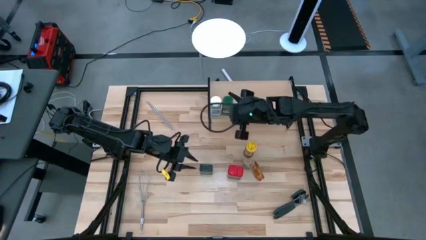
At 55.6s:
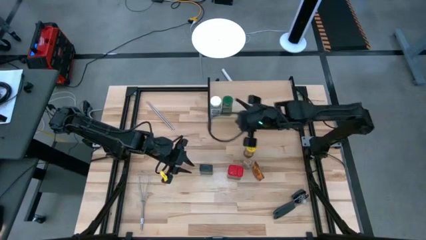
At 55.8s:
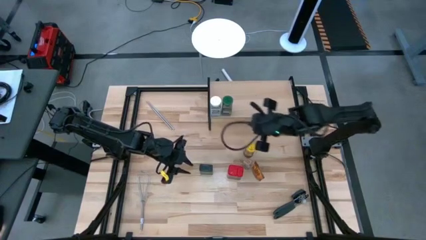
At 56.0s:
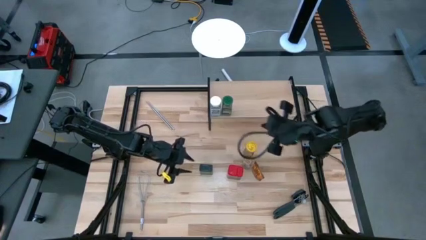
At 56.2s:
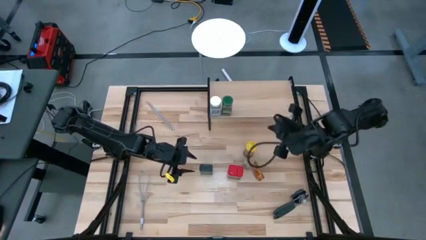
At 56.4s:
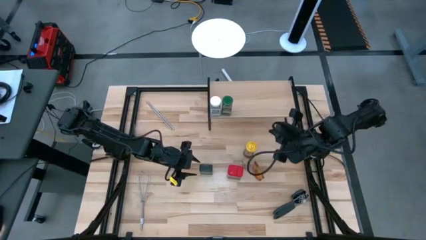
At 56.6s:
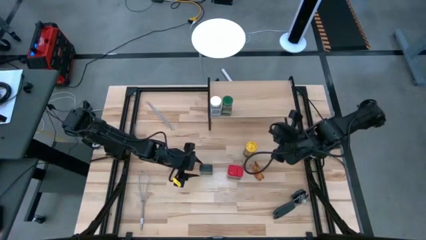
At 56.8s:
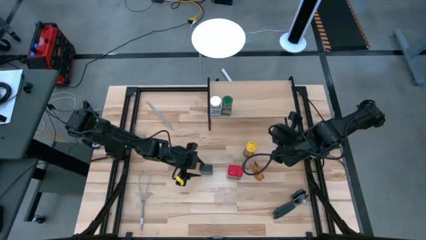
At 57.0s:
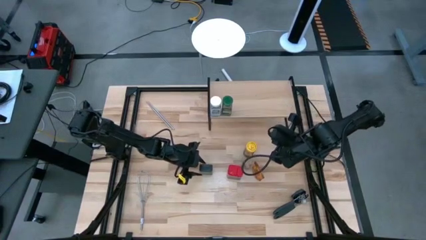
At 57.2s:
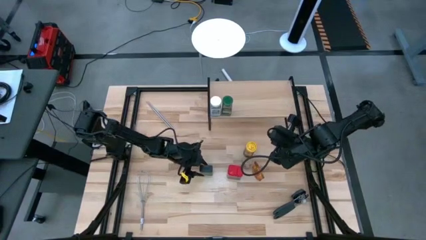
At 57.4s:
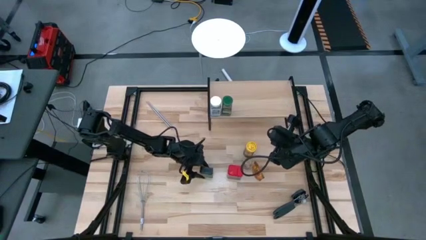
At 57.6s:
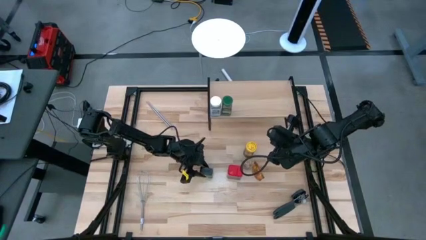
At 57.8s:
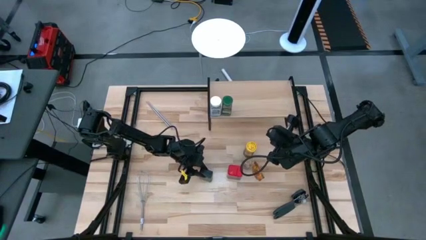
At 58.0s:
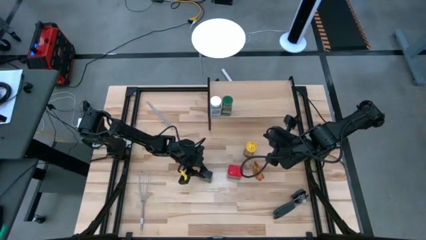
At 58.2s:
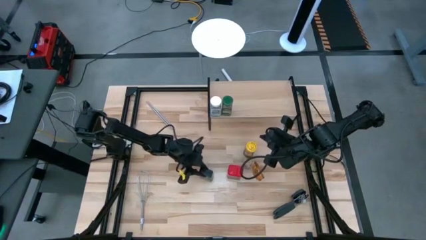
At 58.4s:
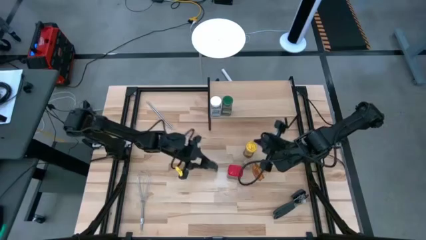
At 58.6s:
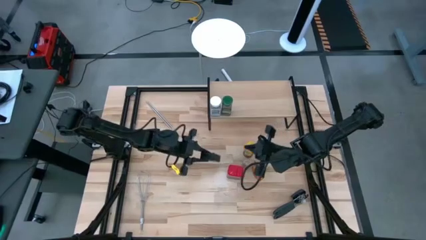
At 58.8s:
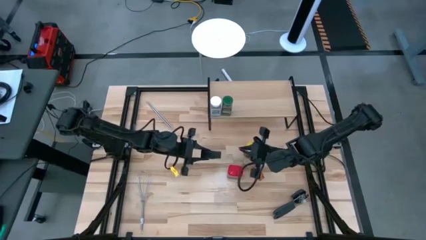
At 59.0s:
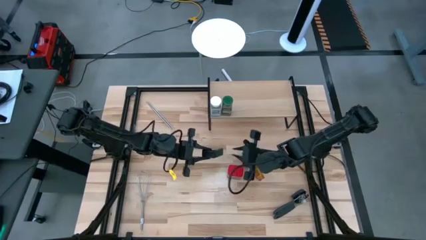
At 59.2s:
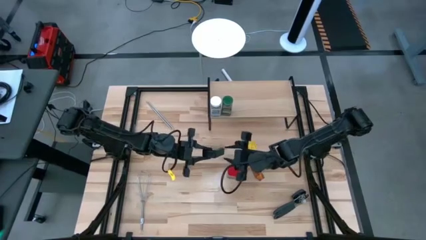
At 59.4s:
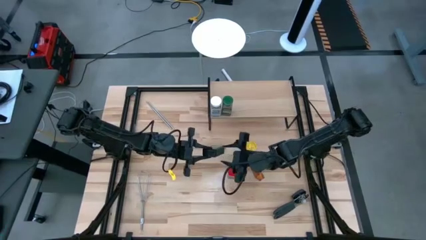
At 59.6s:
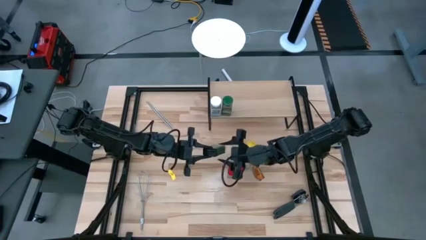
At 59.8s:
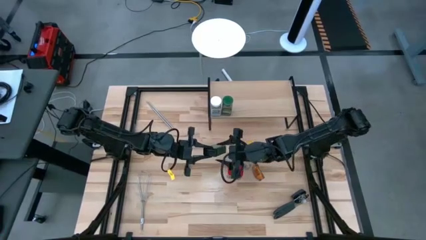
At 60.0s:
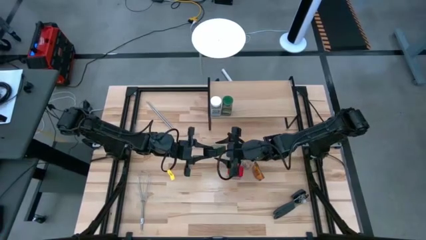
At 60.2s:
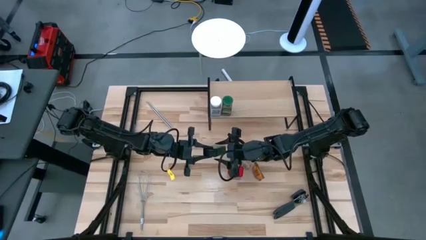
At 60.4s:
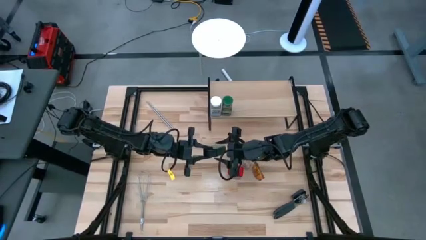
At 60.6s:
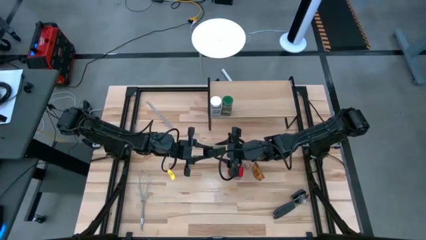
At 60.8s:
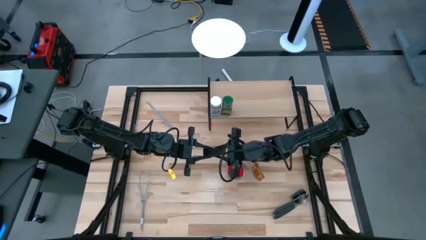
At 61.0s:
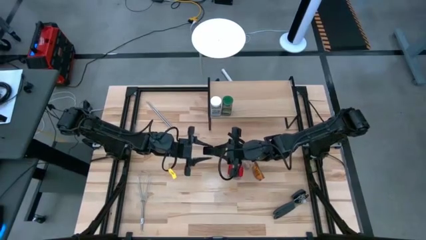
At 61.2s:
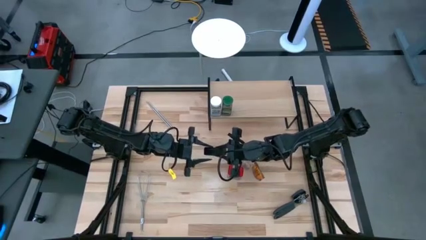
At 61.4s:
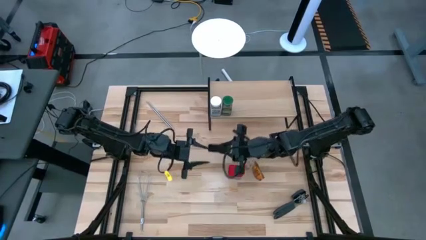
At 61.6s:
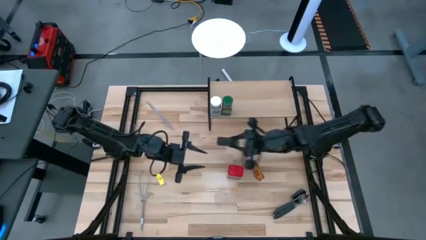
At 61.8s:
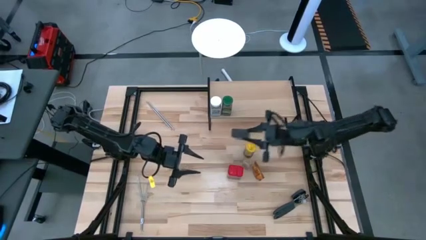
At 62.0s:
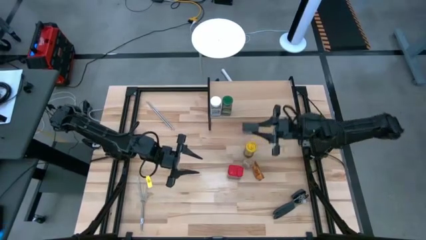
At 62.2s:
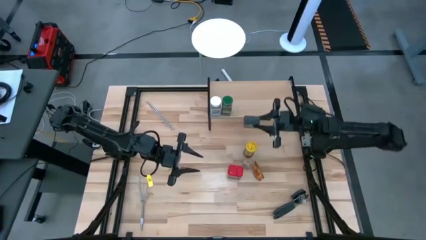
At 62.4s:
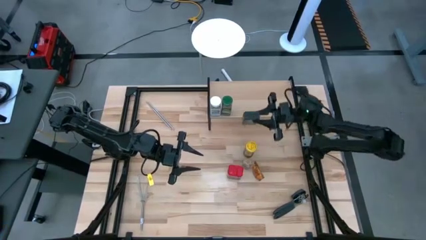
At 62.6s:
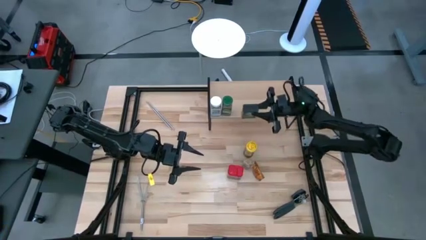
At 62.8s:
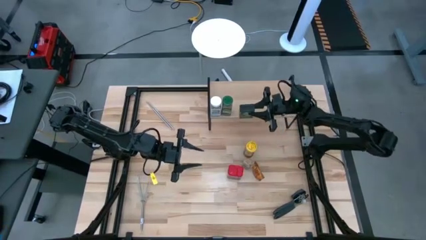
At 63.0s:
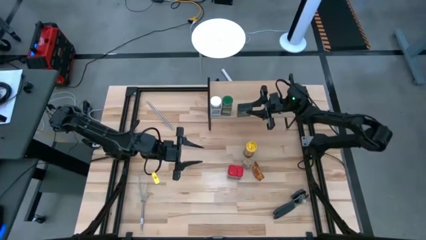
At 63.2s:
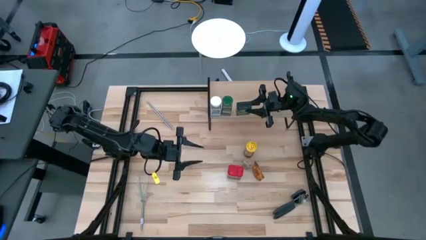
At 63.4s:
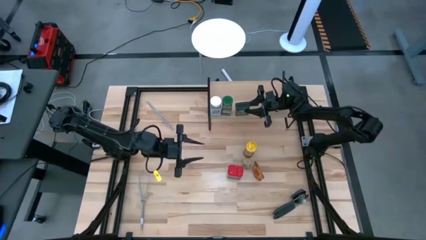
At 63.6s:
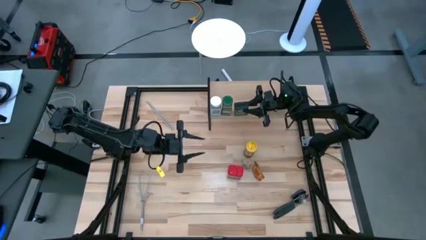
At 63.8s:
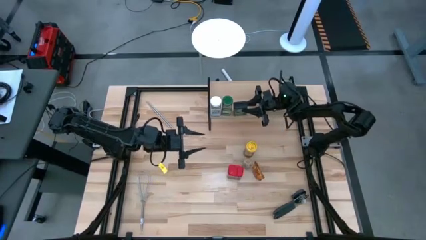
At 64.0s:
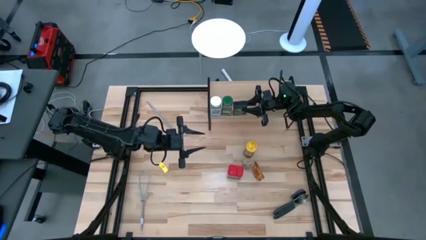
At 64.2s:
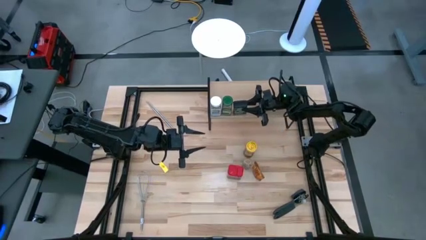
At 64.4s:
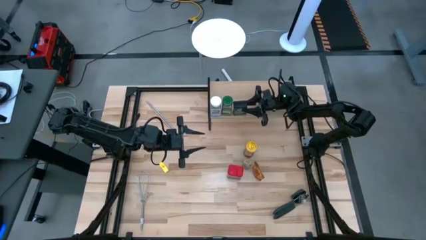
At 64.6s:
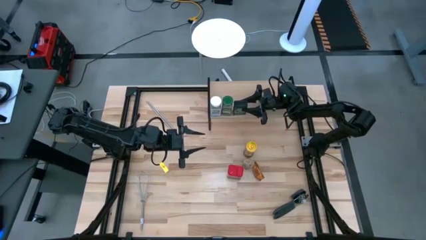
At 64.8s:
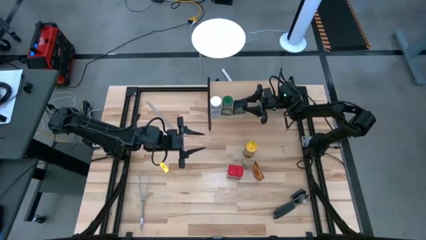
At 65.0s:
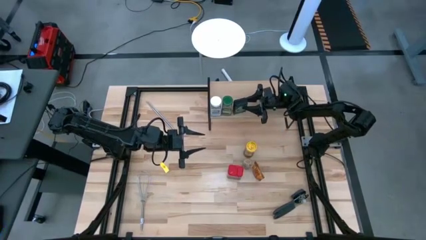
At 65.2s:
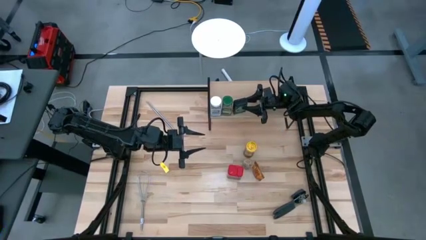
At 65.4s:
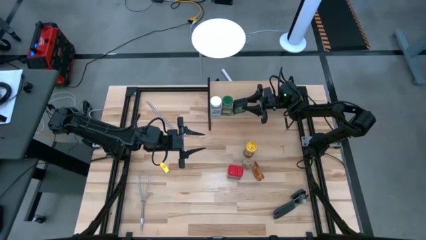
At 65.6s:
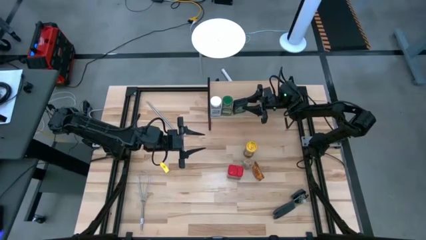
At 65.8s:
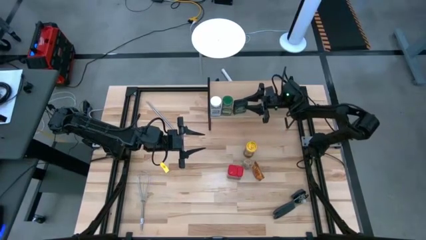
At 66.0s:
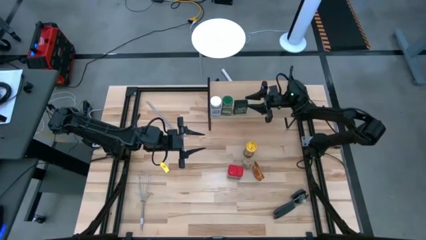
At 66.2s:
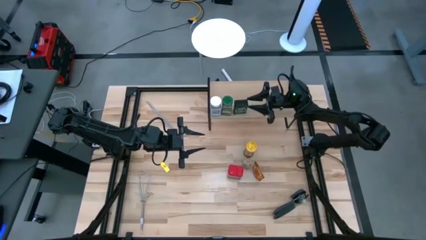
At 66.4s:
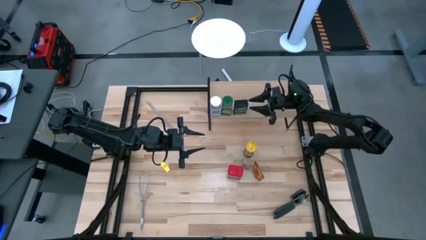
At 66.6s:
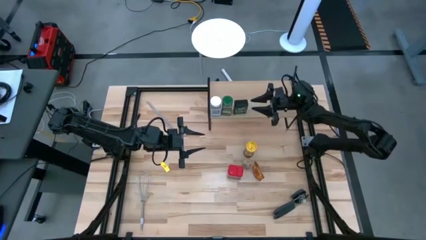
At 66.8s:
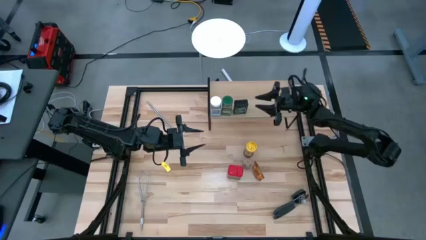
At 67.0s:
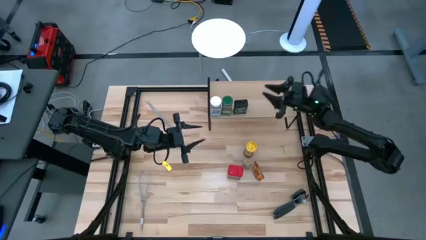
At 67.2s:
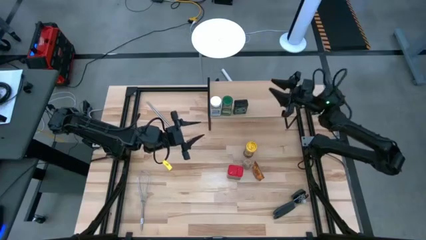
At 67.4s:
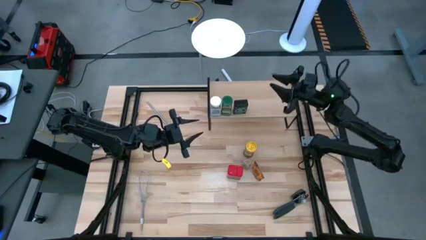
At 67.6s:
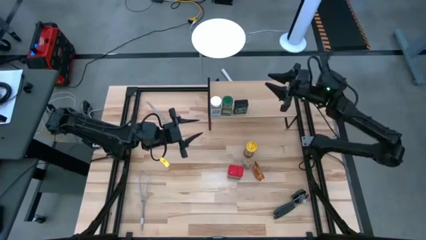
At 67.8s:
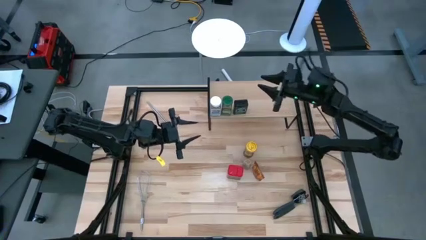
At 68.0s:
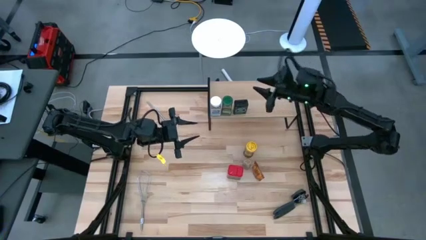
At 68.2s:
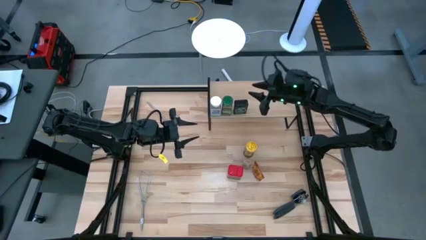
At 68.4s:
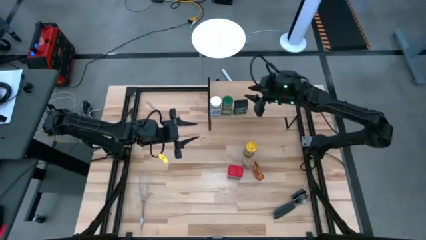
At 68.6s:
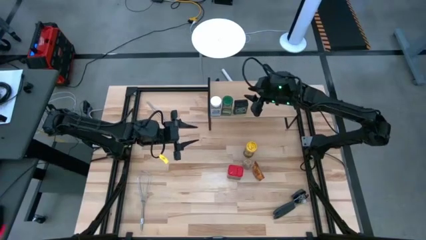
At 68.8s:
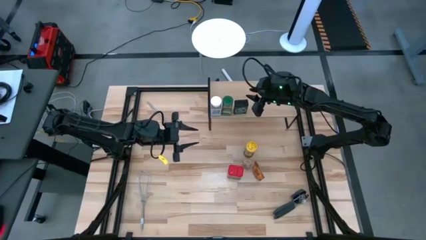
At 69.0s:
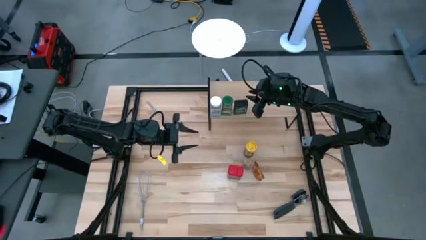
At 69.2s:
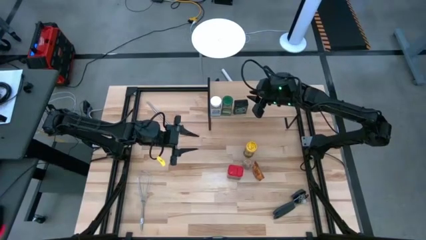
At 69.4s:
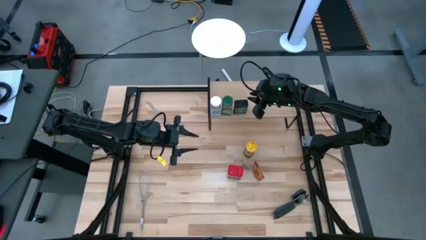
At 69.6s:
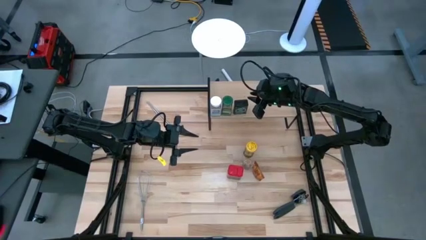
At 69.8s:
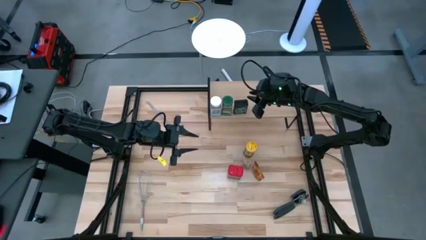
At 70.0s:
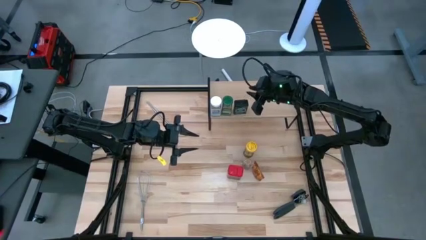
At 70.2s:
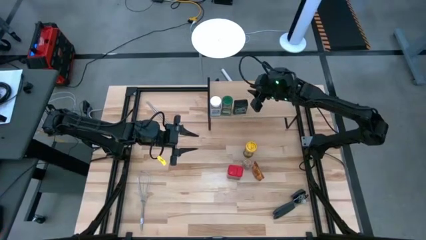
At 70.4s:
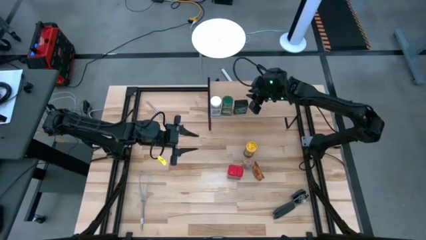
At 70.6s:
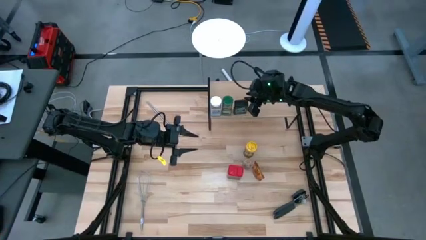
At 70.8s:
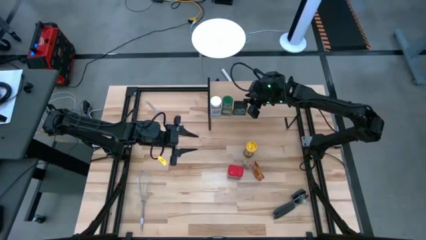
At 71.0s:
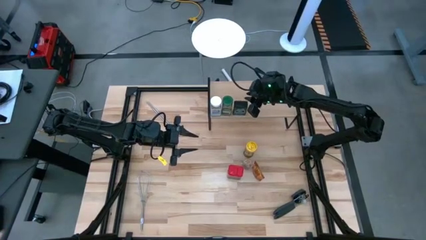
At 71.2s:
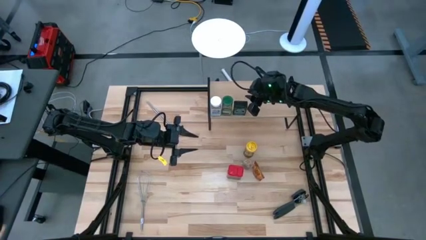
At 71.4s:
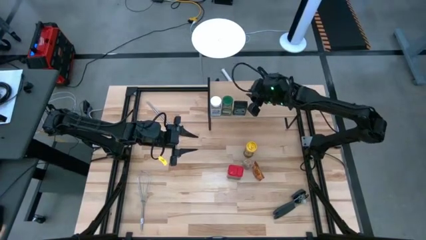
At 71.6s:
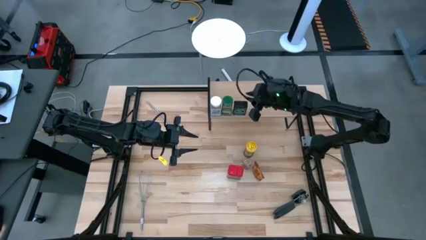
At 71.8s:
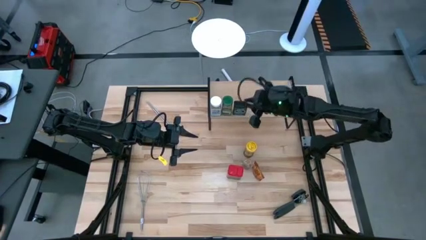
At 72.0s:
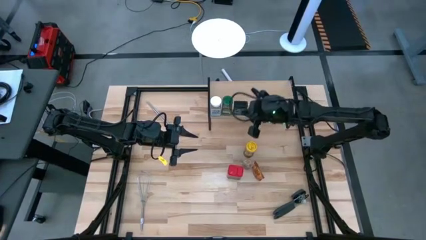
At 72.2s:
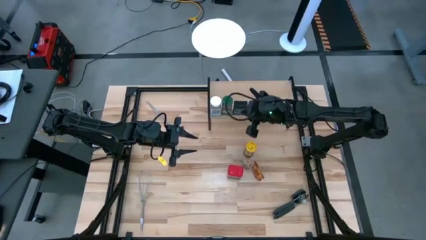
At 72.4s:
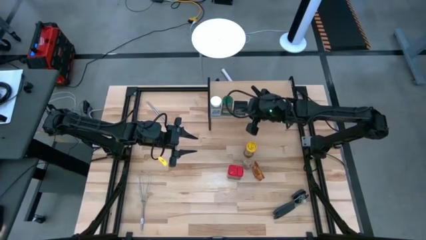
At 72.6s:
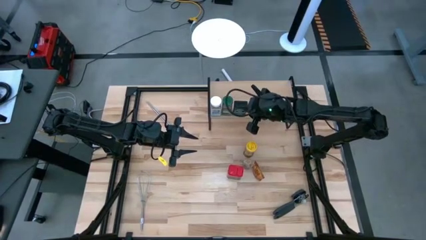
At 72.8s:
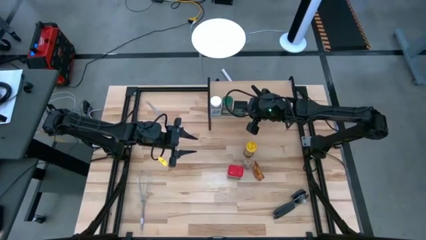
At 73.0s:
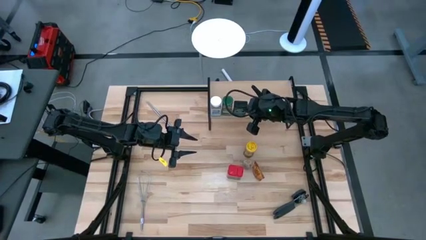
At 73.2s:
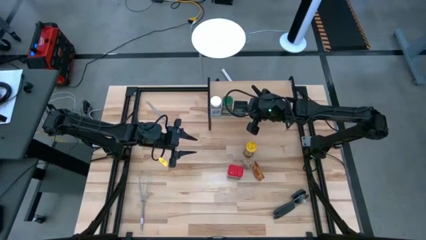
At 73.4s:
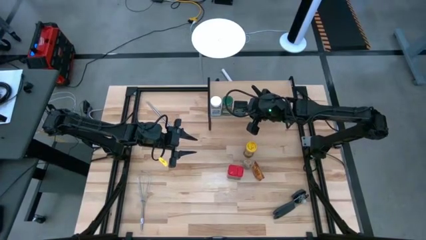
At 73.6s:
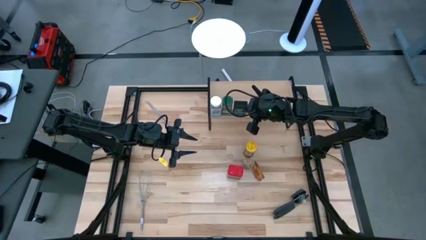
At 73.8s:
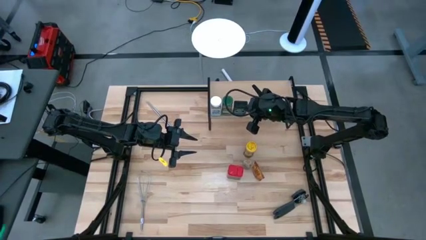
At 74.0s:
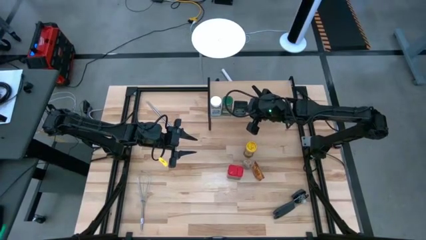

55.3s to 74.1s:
Task: Shelf spices
Put the green seasoning can on the shelf
